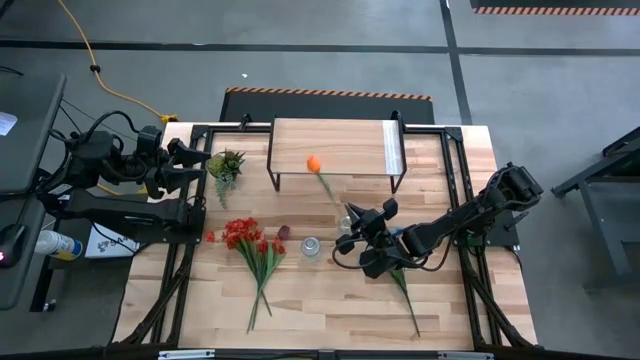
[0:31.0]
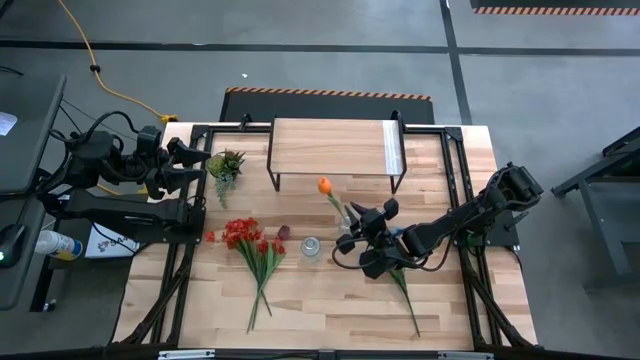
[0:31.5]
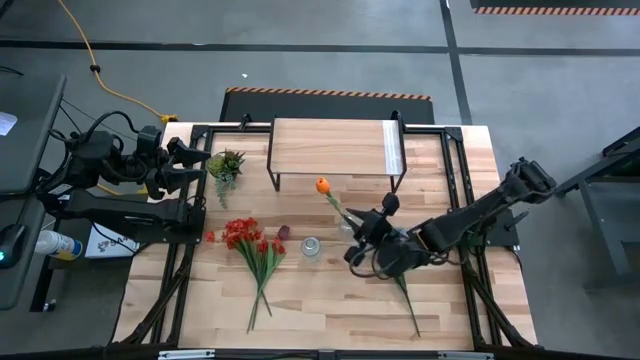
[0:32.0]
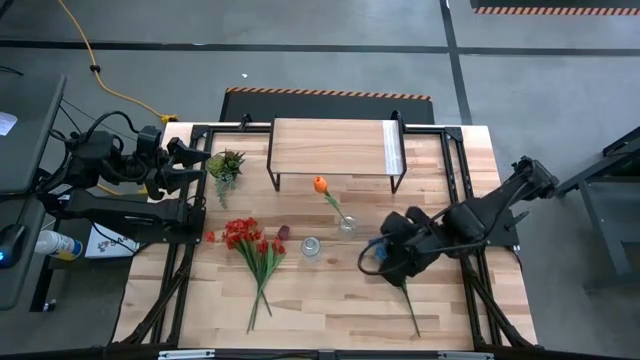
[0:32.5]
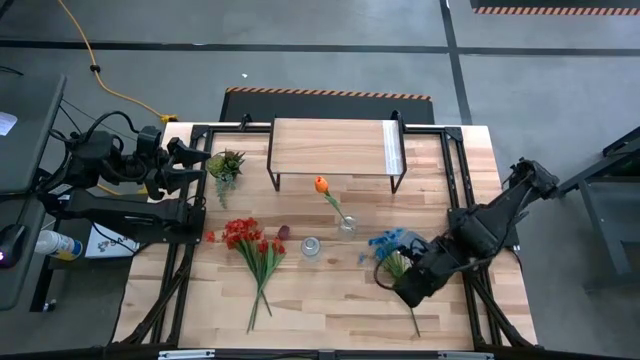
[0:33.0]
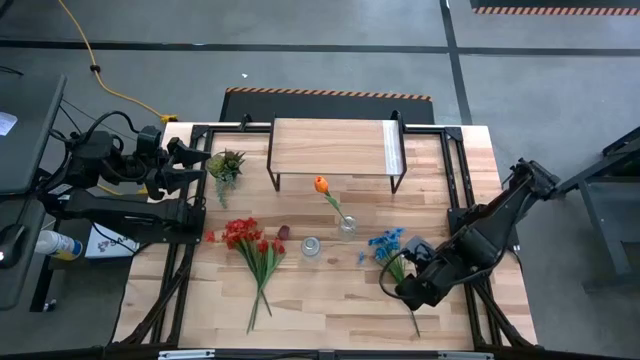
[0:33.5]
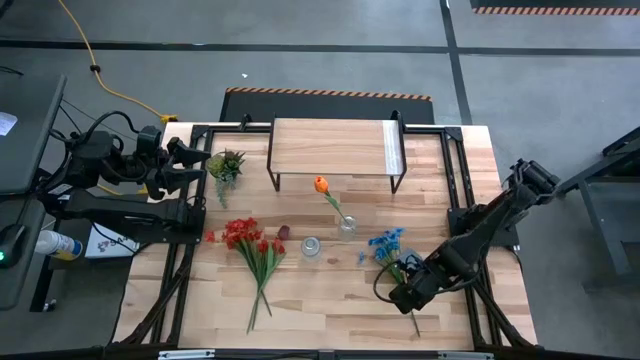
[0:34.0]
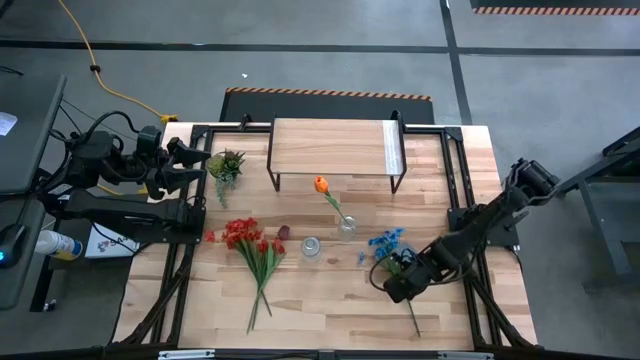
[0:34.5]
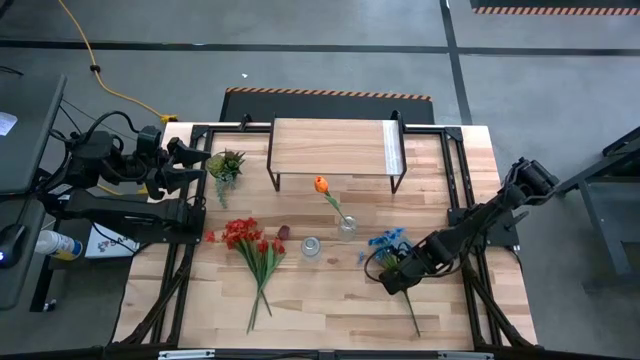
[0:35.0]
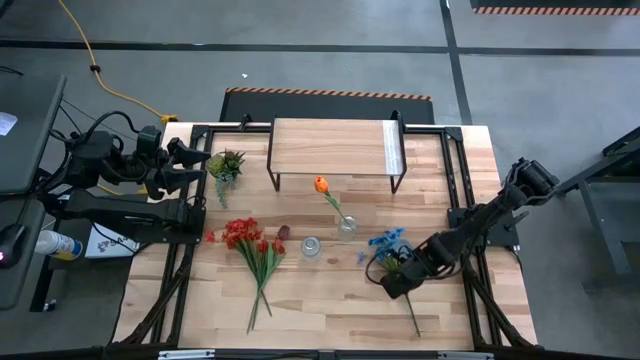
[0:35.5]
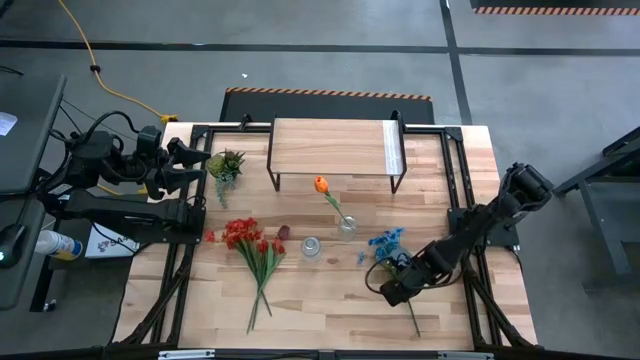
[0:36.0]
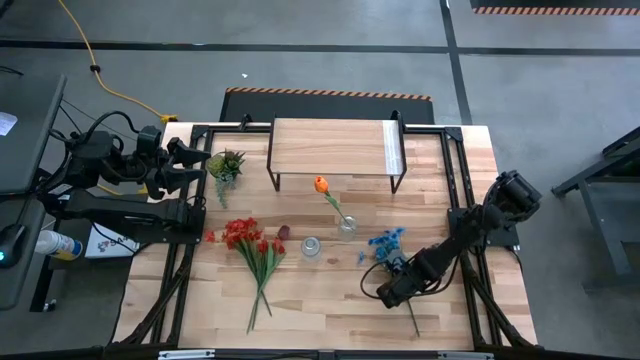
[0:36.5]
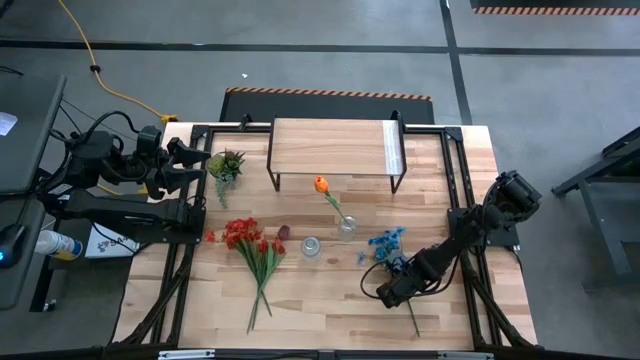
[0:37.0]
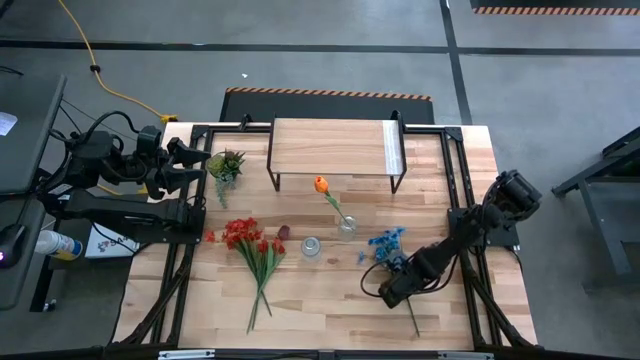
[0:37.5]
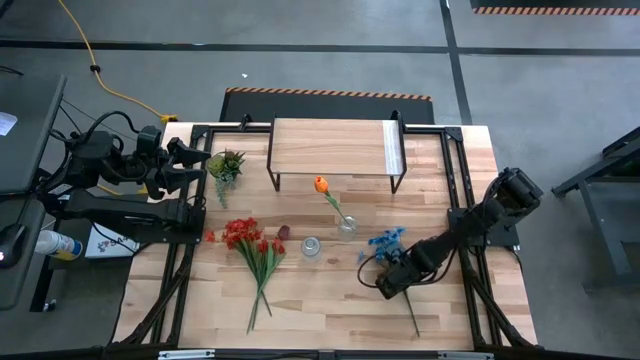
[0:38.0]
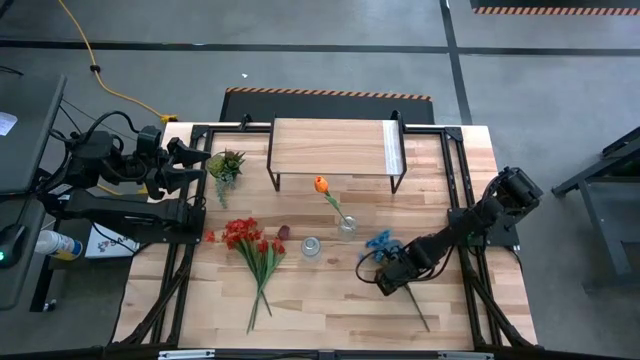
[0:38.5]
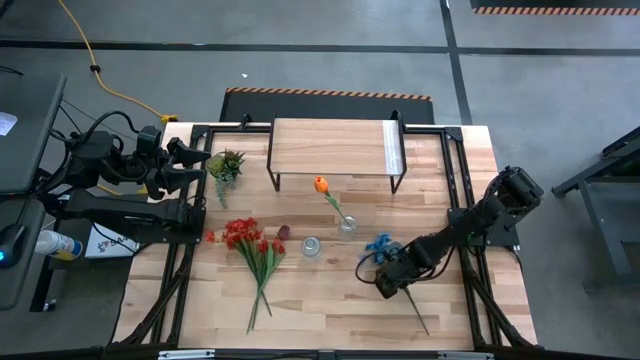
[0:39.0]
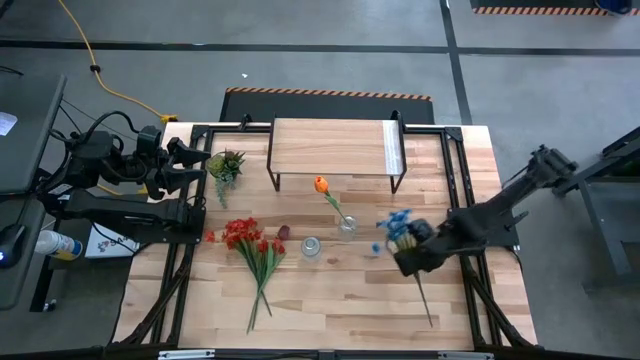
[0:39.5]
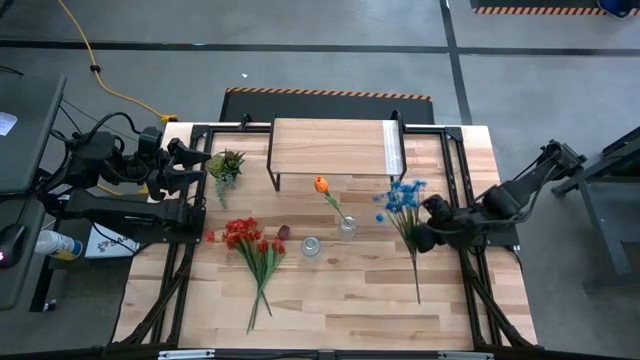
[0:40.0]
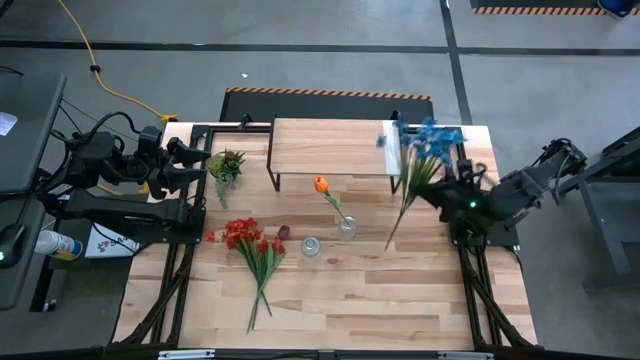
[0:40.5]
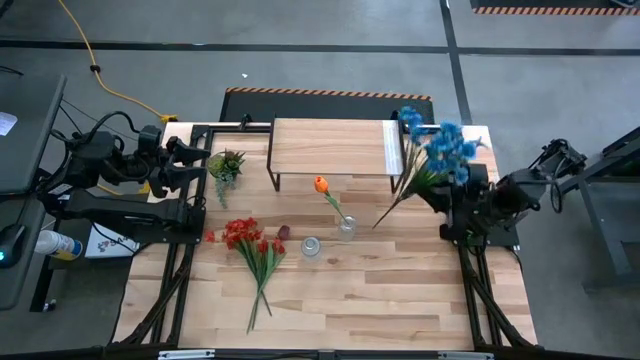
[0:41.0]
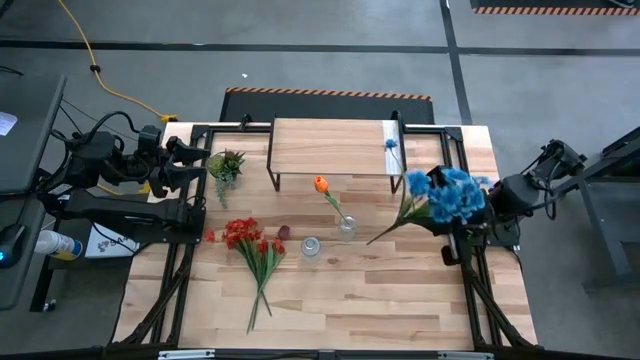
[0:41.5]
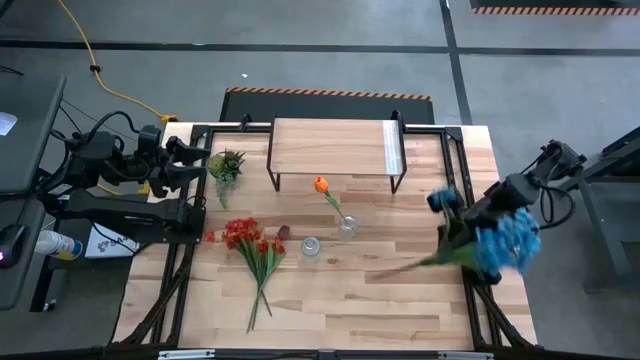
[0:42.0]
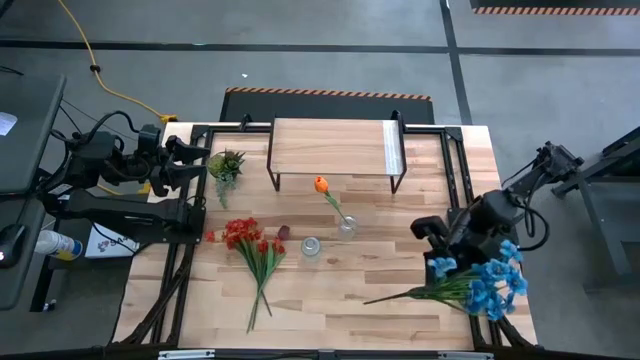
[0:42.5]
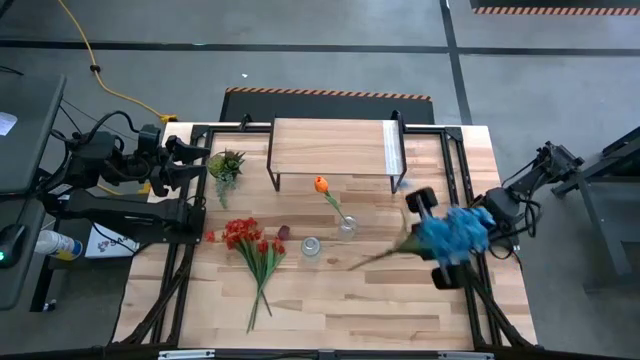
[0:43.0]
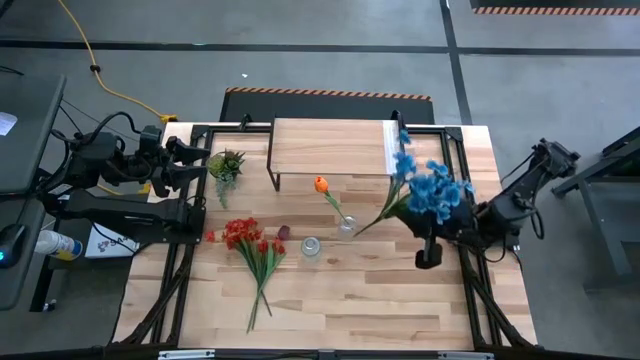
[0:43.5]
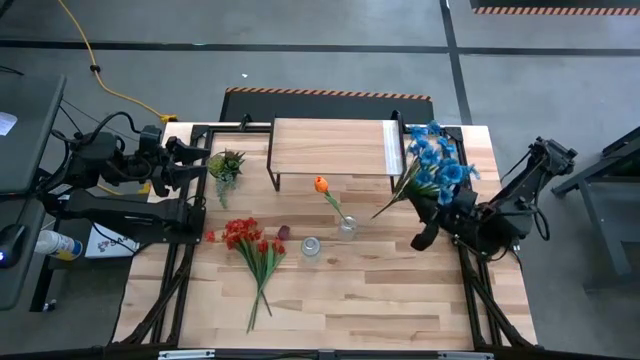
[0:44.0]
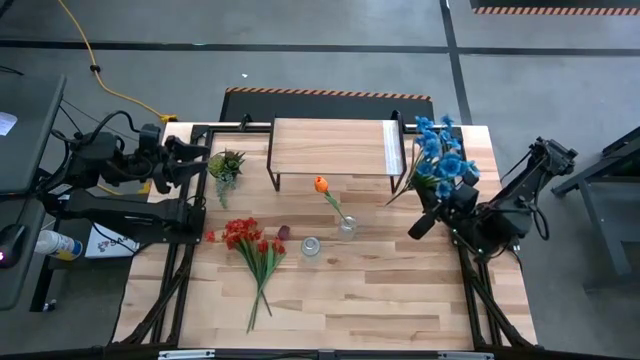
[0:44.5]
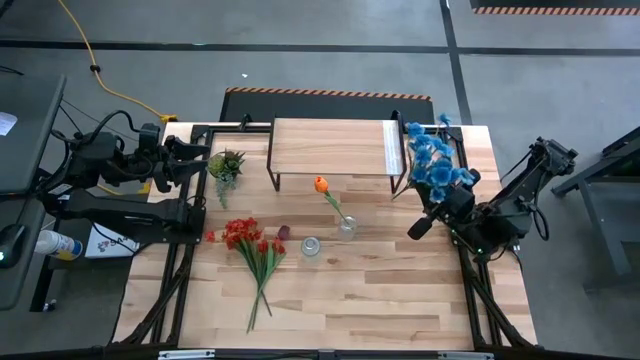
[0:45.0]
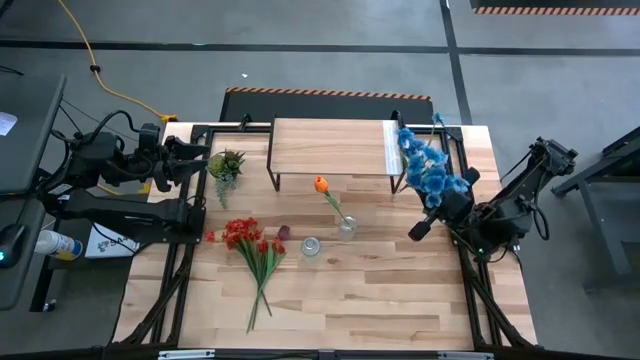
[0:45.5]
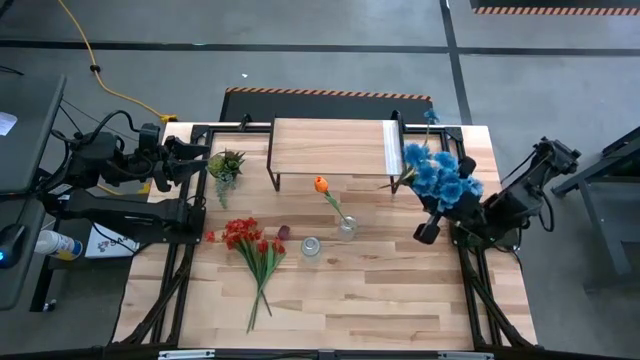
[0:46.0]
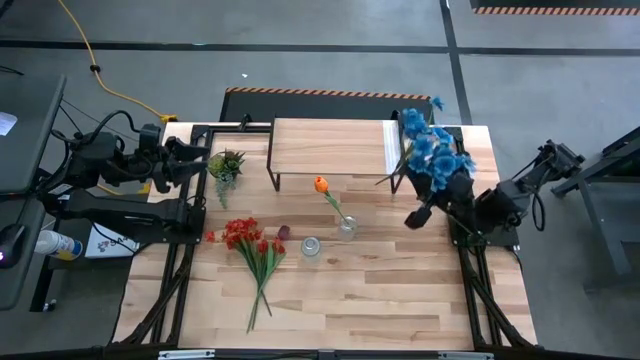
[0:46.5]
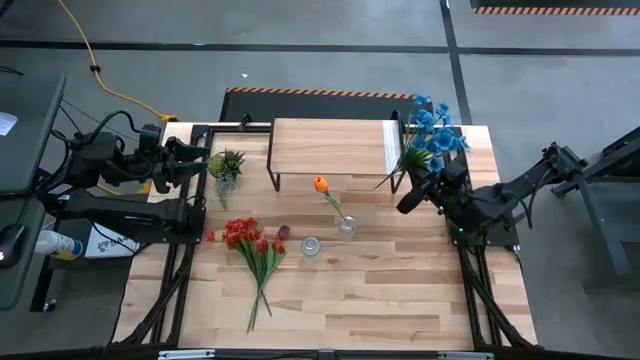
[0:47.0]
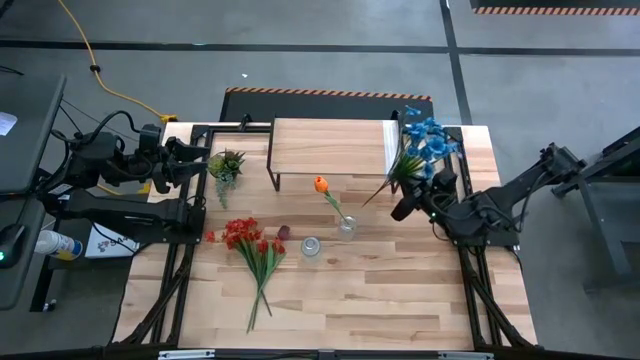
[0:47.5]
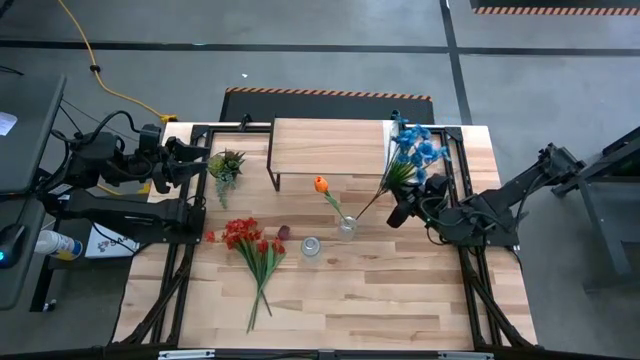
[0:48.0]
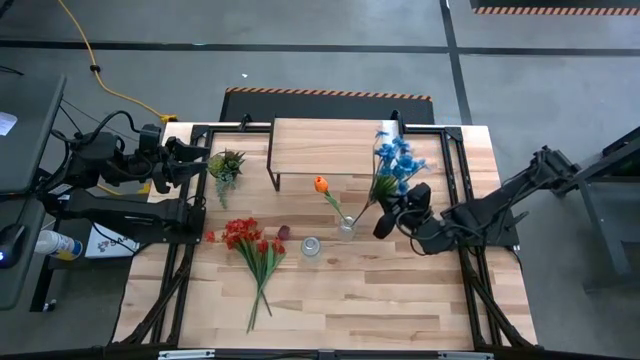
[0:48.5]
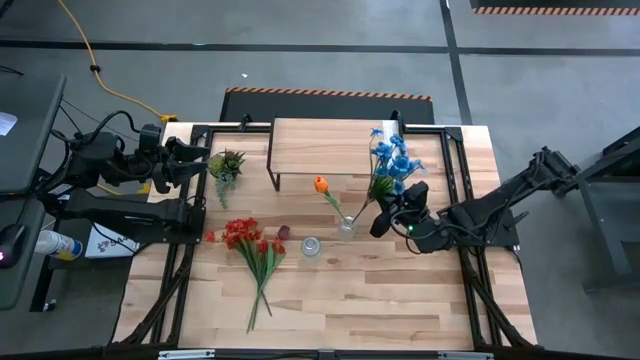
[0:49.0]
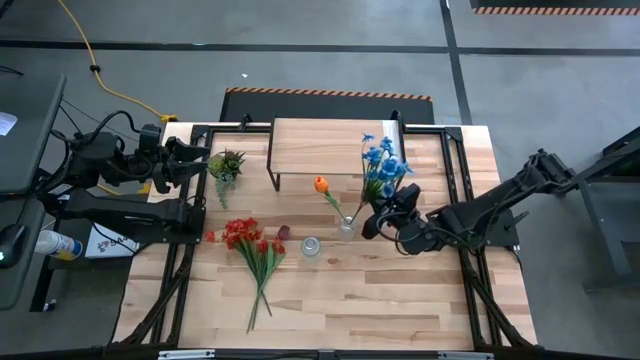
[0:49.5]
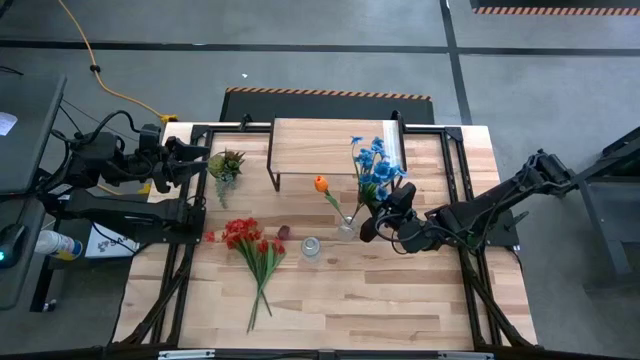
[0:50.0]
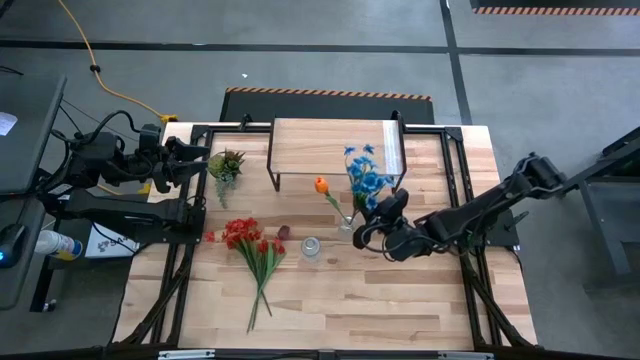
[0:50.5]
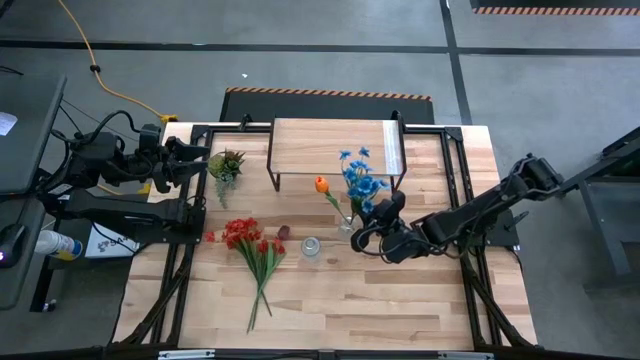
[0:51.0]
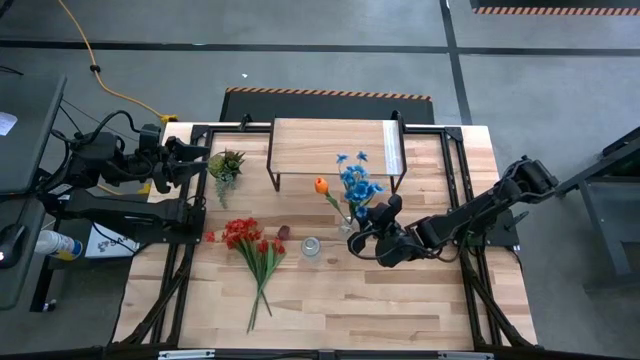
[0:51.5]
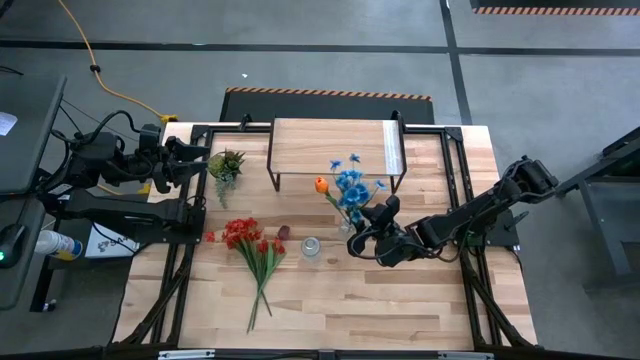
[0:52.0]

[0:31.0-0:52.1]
Task: Pick and place flowers into a vace then onto a shelf
Put the blue flowers into the top transparent vase
